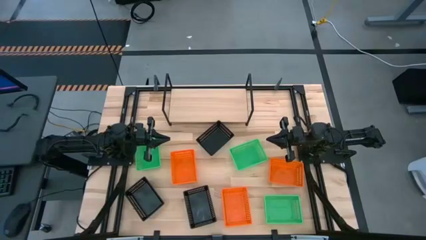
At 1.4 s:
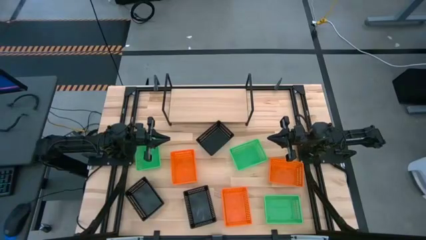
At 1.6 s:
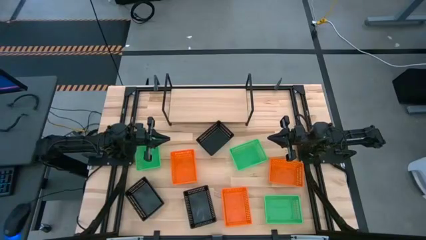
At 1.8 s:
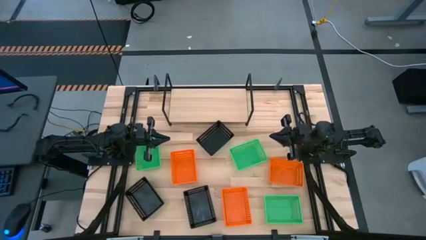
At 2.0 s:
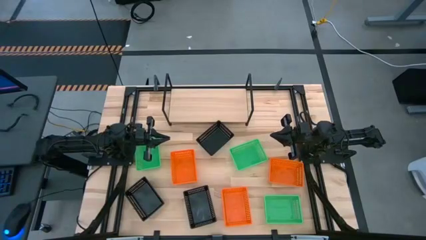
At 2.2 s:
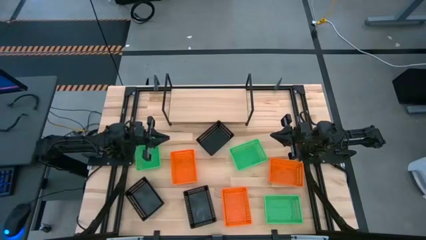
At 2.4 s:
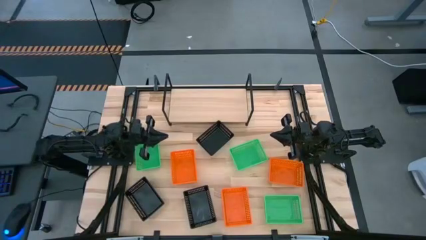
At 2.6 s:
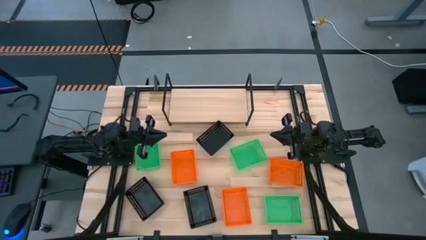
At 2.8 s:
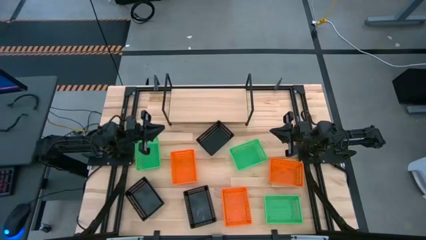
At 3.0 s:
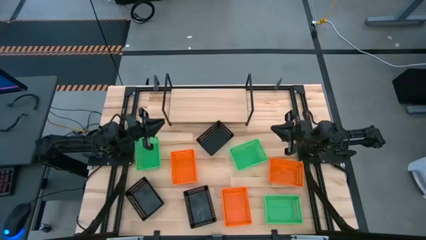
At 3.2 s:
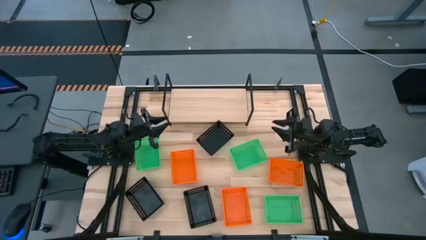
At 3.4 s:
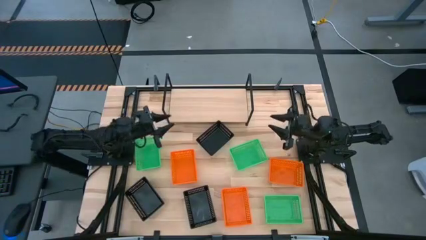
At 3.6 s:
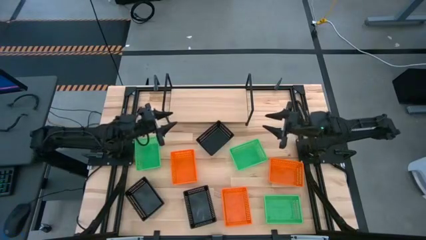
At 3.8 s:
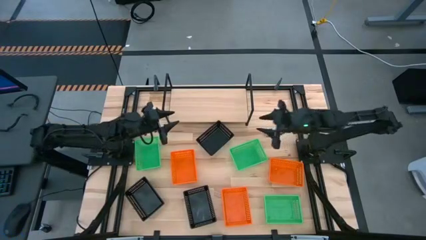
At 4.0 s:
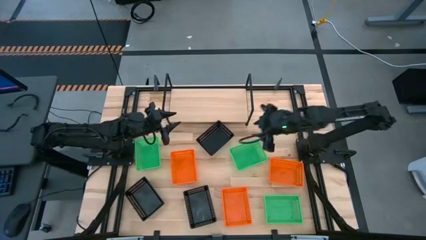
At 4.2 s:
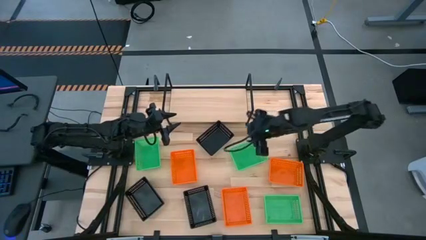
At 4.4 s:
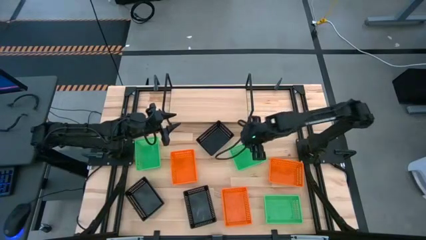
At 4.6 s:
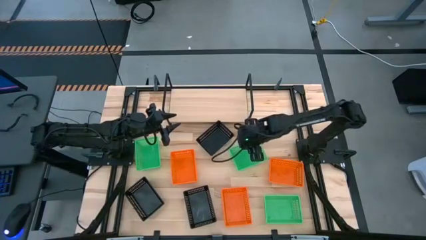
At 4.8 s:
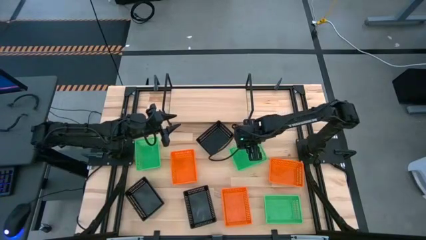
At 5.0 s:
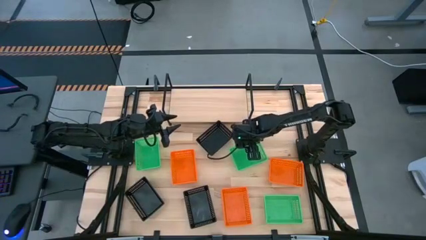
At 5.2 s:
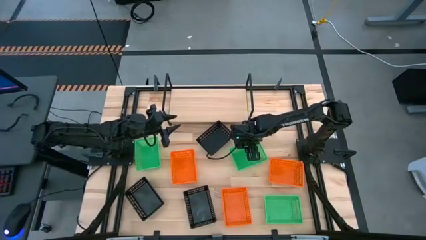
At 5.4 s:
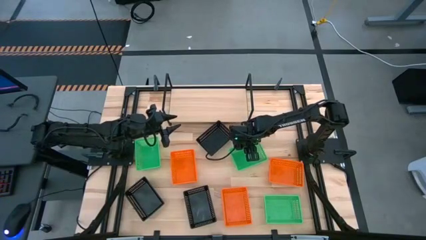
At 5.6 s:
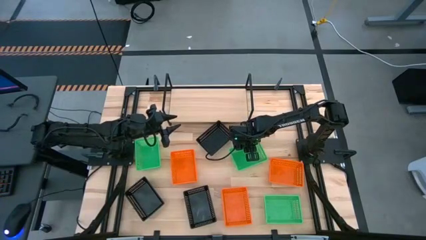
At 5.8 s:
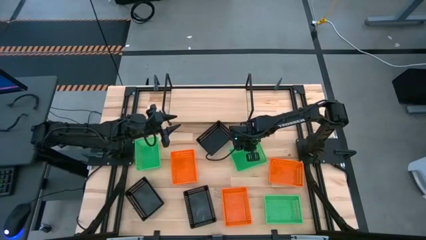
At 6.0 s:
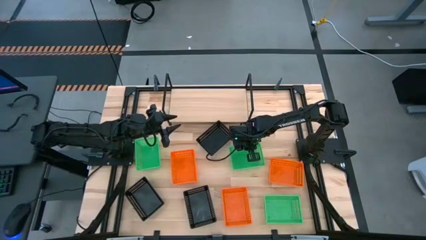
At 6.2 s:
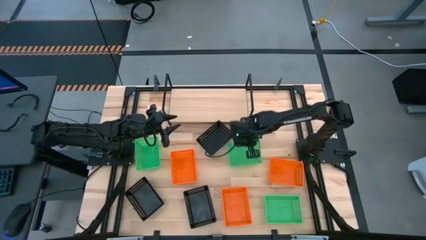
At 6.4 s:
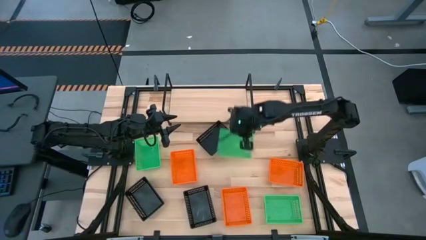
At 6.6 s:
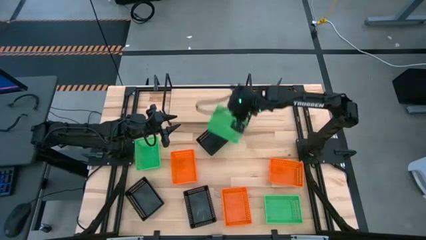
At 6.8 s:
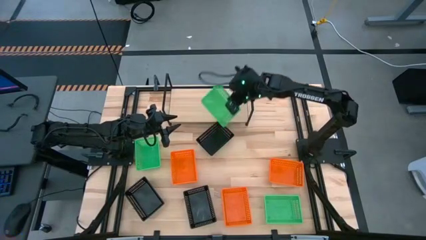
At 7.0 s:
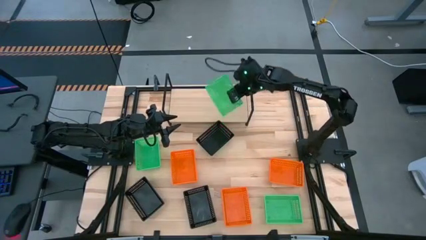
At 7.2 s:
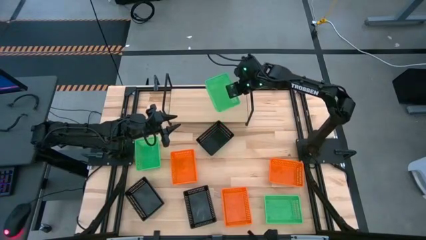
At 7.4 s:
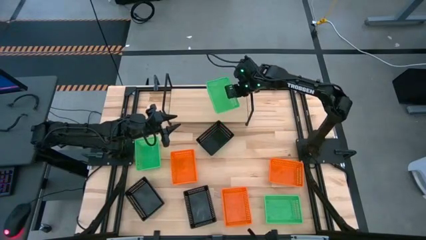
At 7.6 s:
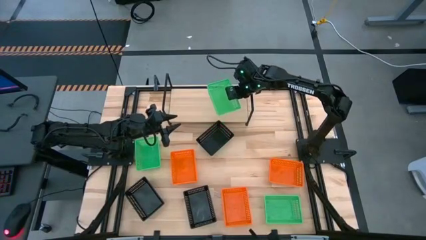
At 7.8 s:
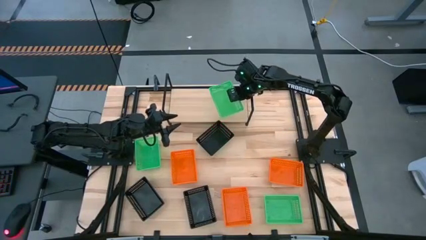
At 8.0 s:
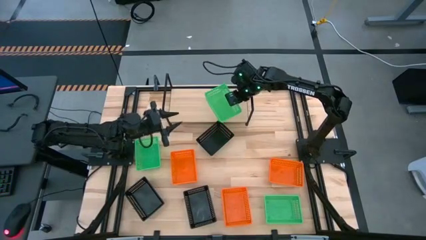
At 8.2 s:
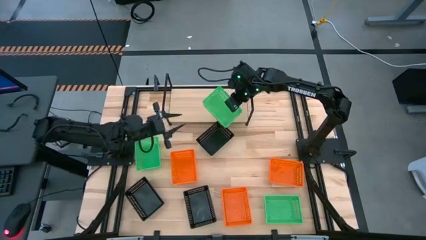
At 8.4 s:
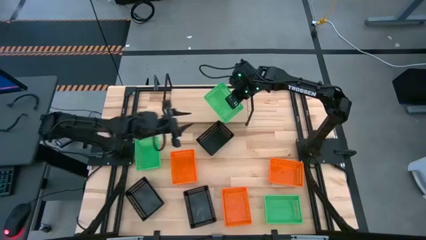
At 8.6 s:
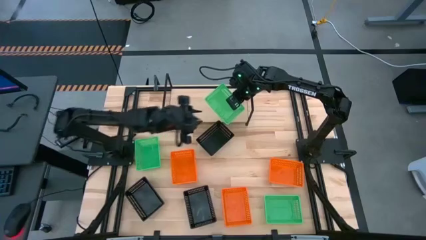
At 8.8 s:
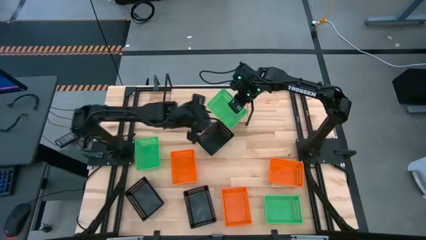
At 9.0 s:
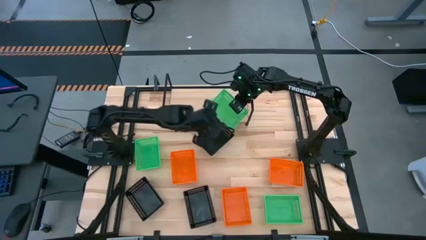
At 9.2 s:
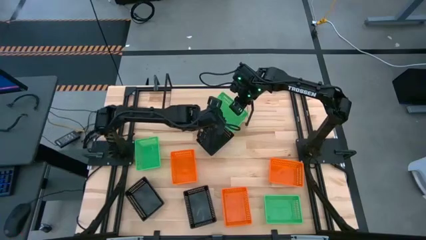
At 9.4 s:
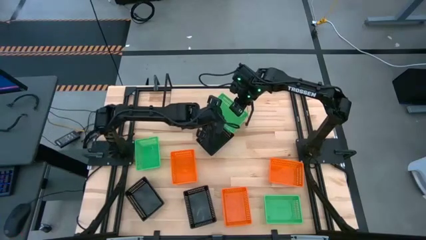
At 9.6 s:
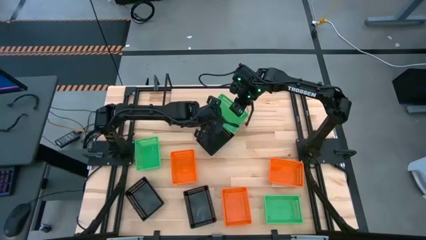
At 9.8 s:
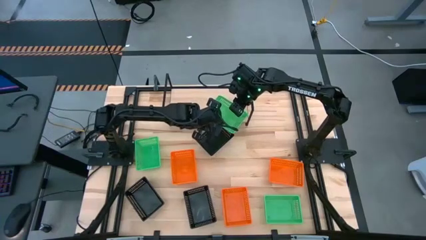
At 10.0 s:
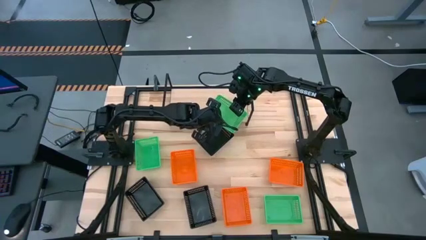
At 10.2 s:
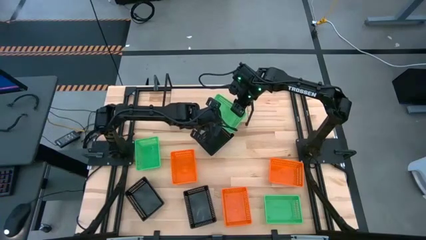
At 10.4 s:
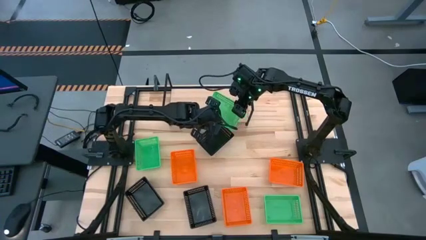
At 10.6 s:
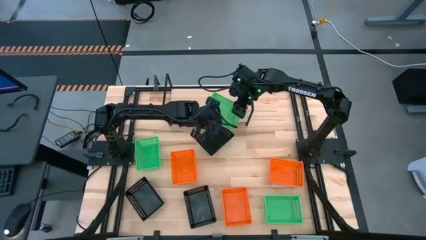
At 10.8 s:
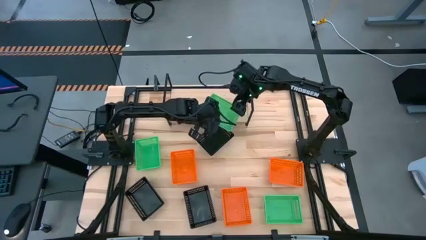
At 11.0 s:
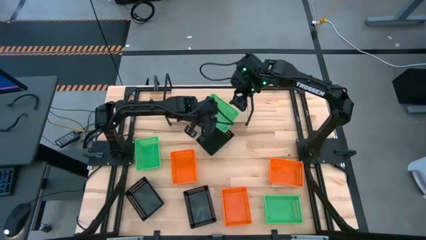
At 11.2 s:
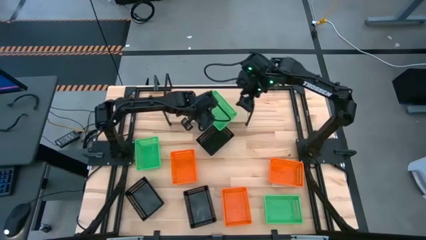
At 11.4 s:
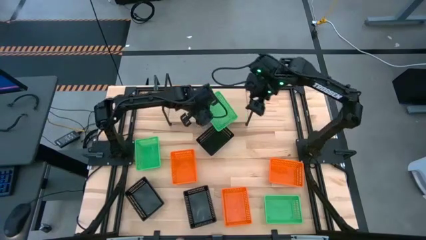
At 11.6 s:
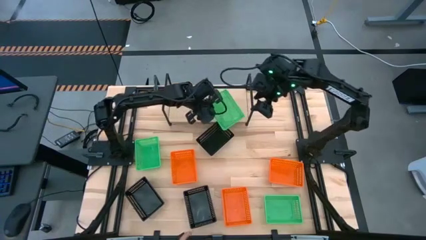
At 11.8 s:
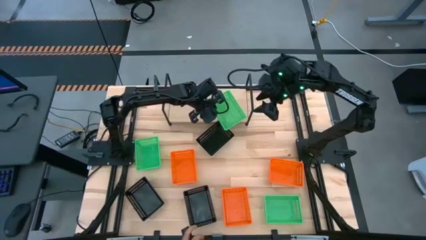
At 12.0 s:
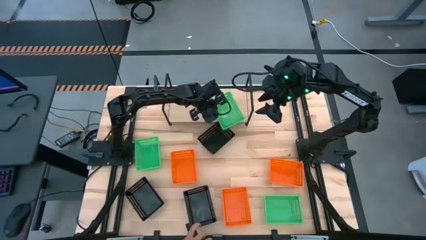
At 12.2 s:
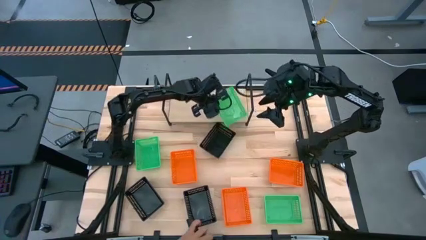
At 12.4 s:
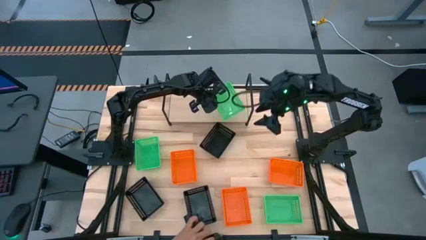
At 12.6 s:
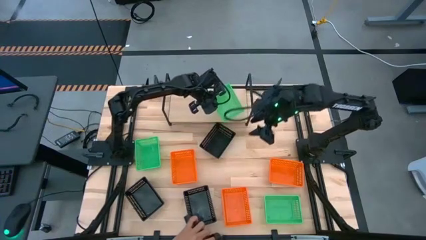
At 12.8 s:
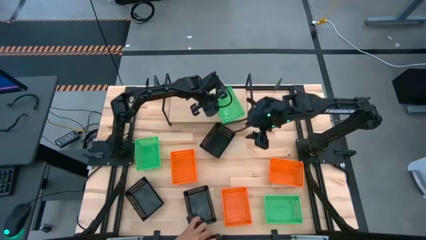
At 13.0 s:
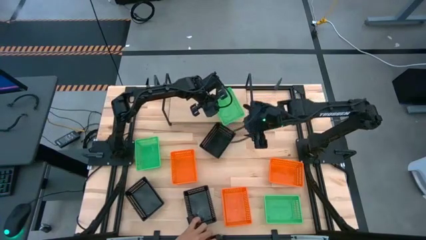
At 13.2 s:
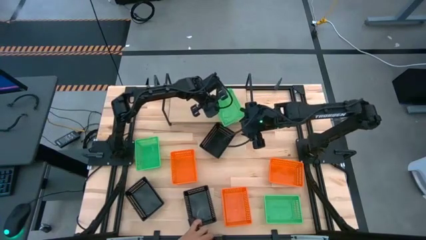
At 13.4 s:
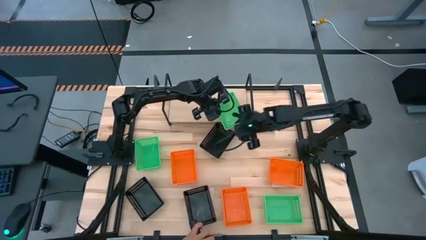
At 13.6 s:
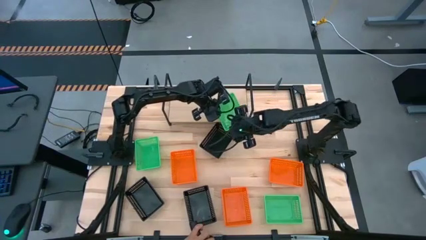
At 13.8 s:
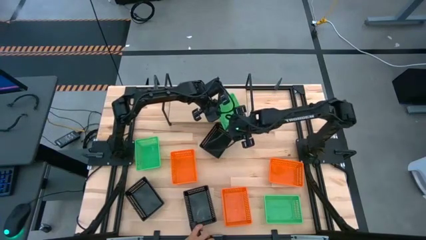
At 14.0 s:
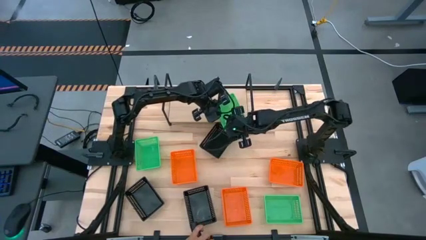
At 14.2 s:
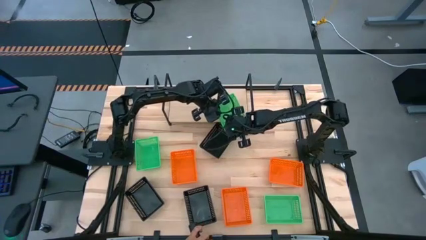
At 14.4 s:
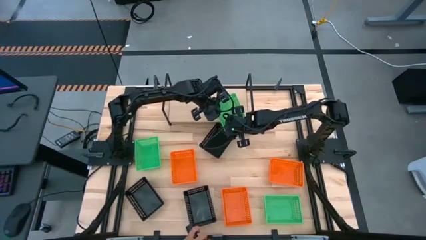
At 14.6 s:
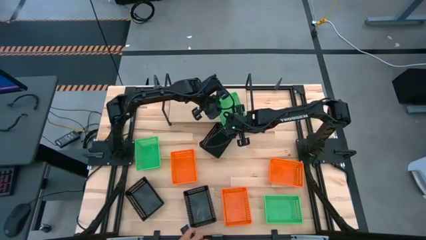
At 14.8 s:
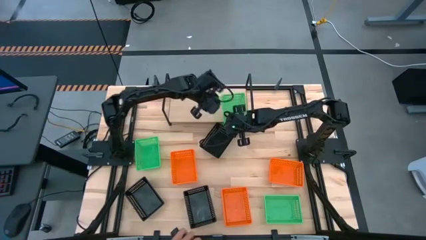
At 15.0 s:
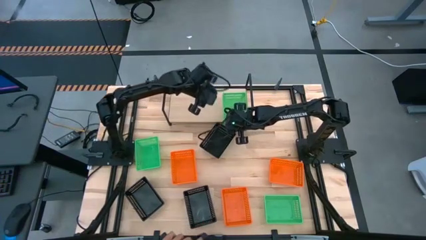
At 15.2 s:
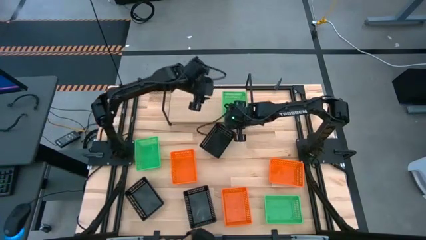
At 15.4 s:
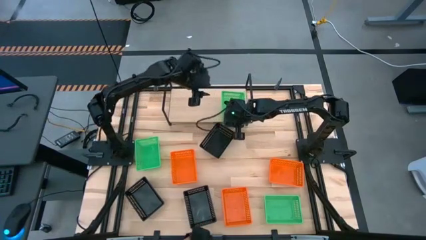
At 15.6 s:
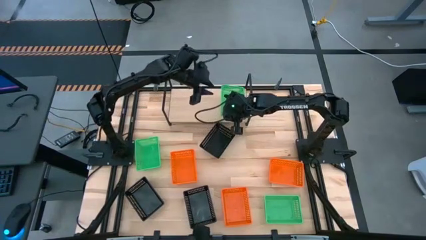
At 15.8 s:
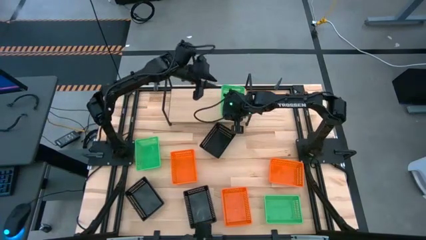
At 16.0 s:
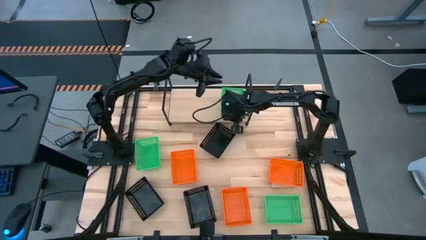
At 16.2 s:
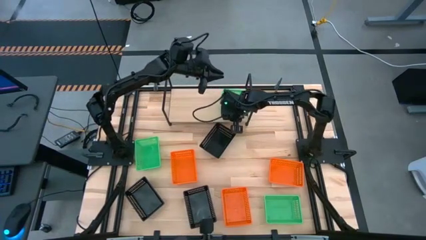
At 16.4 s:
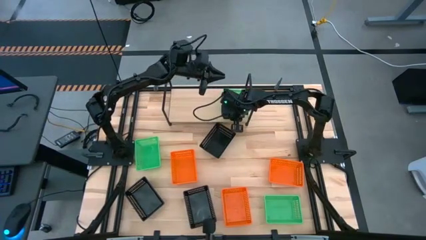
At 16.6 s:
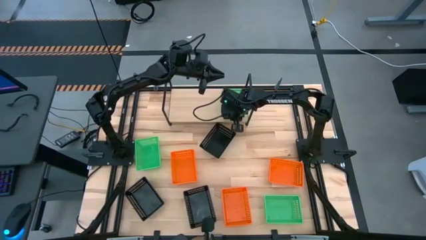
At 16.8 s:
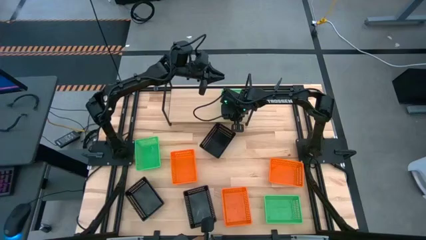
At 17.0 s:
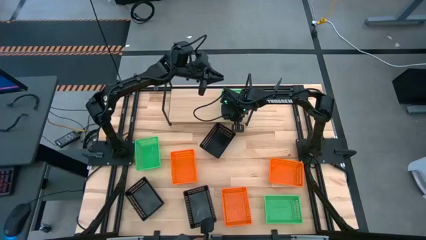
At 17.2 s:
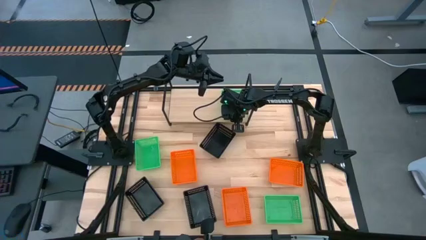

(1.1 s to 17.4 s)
Task: Stack baskets on shelf by color
Put the top right green bin on the shelf
